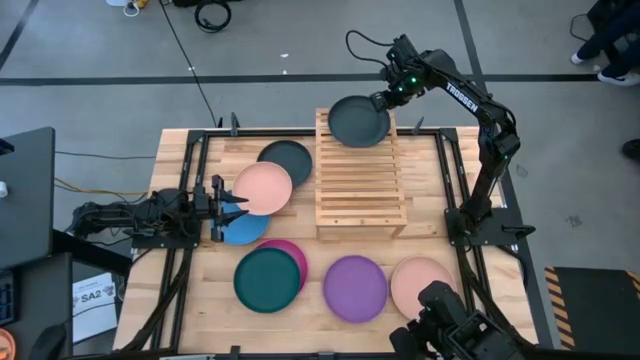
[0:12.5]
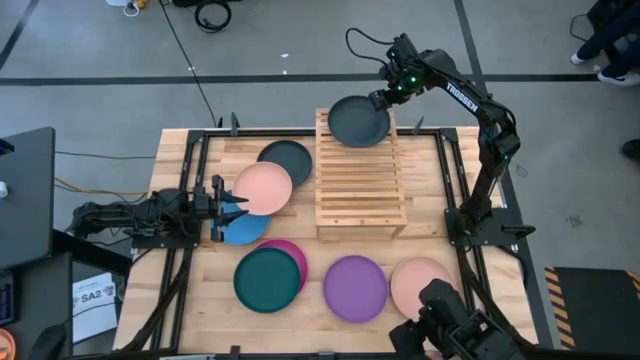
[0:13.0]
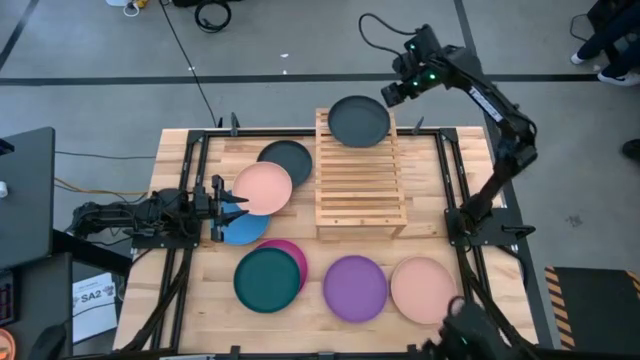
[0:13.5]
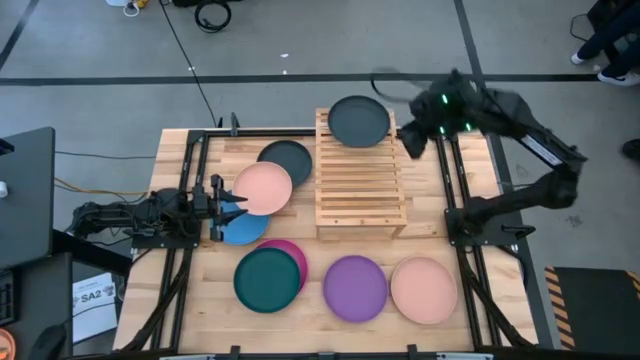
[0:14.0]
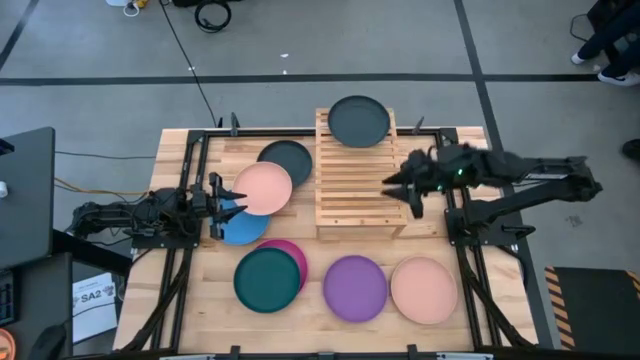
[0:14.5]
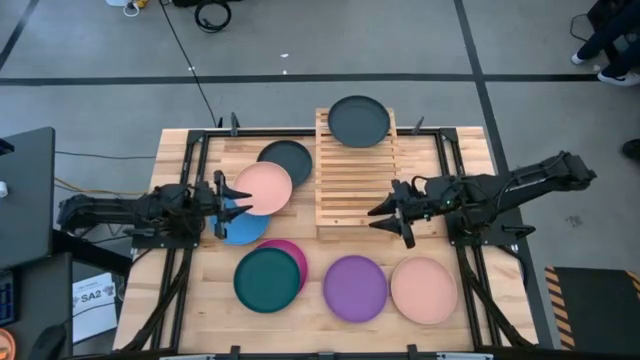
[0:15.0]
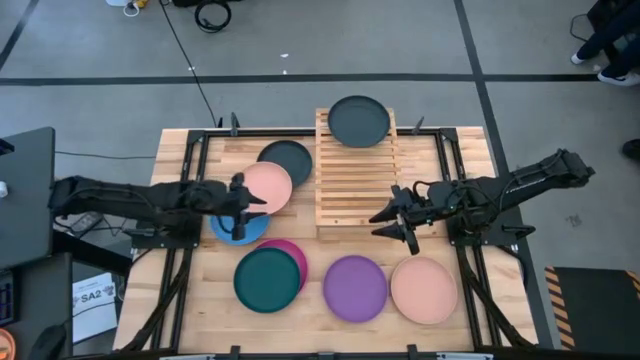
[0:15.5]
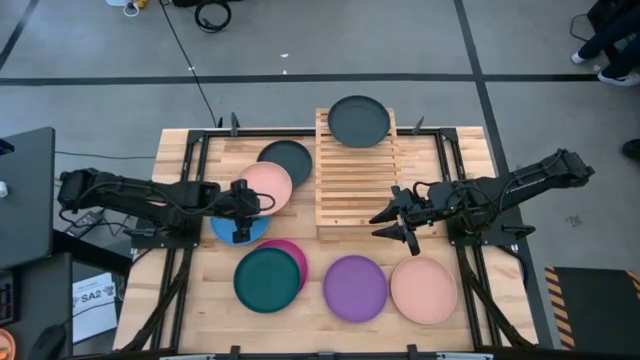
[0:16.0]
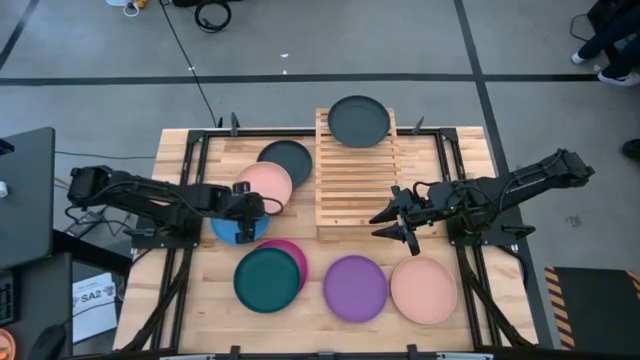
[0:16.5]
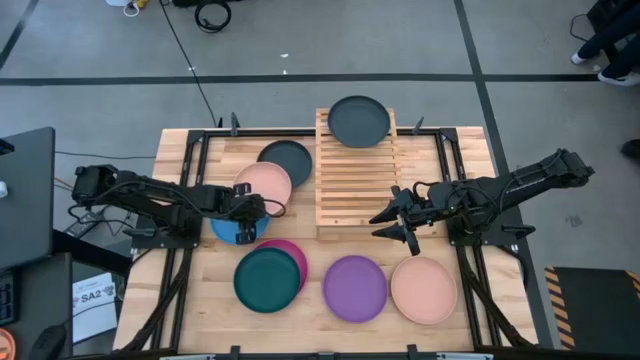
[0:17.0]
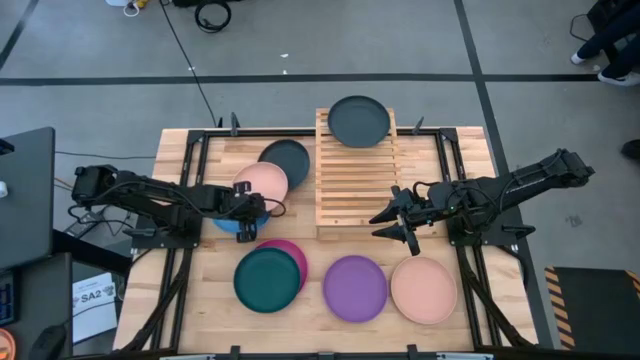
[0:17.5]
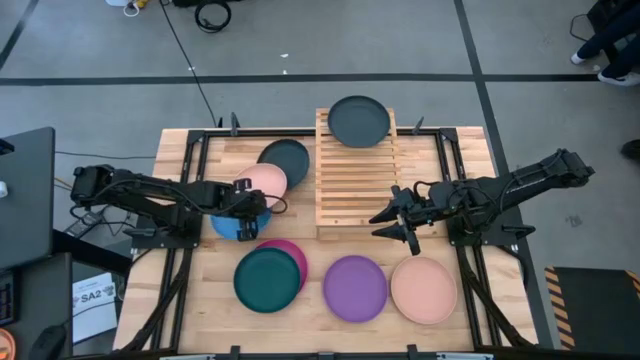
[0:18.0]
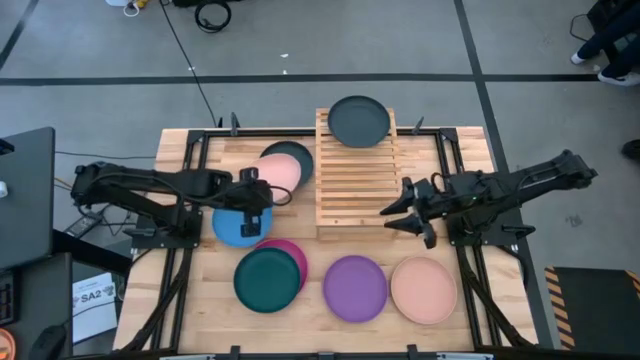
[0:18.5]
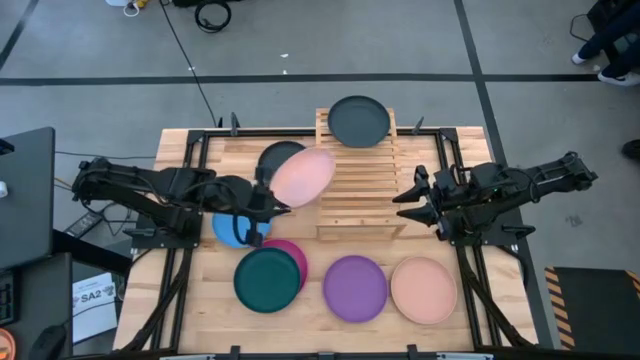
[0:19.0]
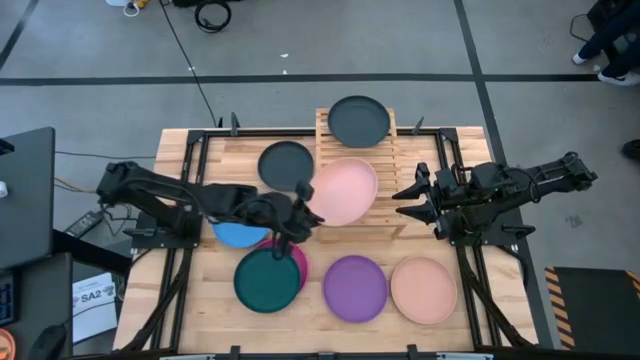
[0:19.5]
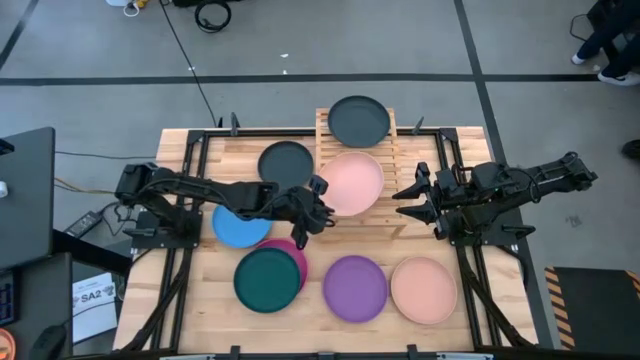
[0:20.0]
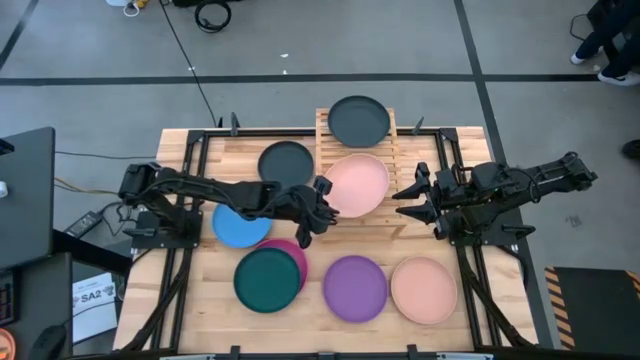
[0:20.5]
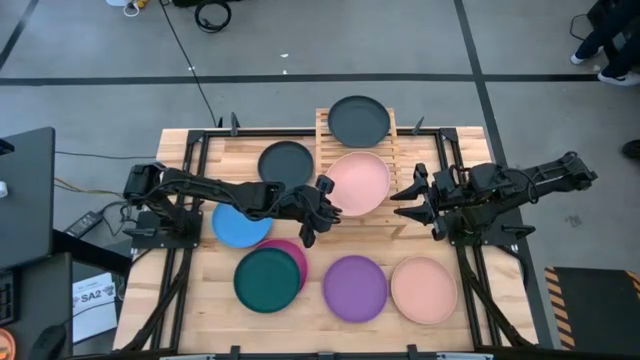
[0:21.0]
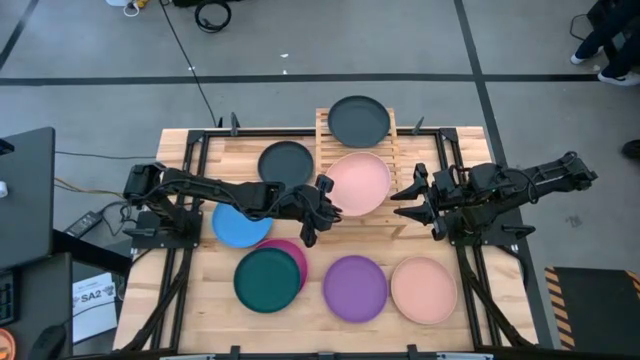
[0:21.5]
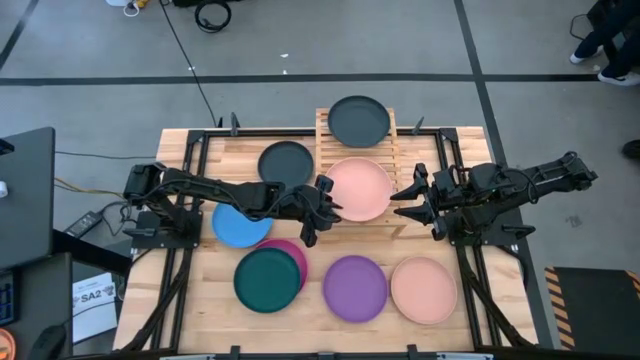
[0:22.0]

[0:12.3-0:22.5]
Task: Place and stack plates onto a shelf
Put the top light pink plate on the shelf

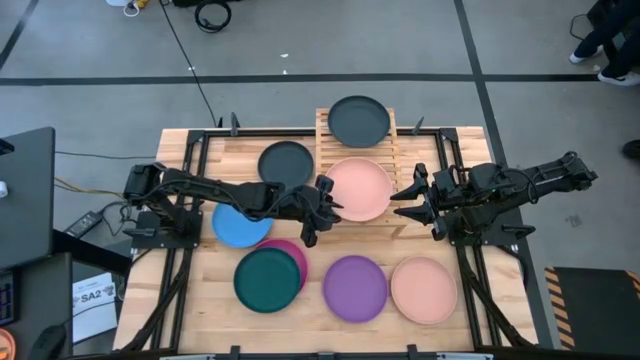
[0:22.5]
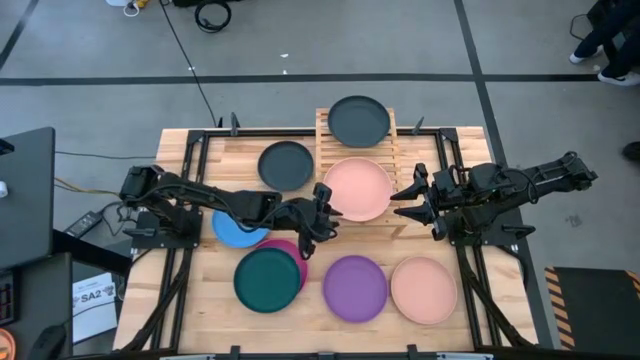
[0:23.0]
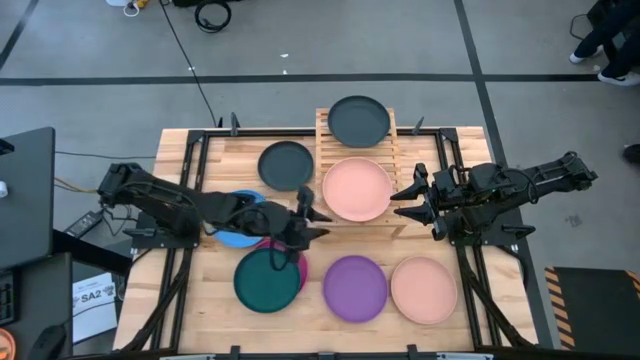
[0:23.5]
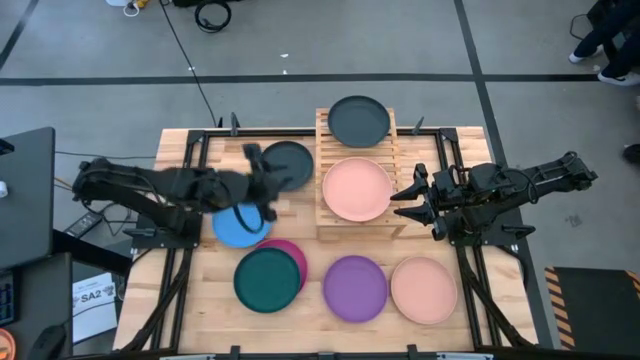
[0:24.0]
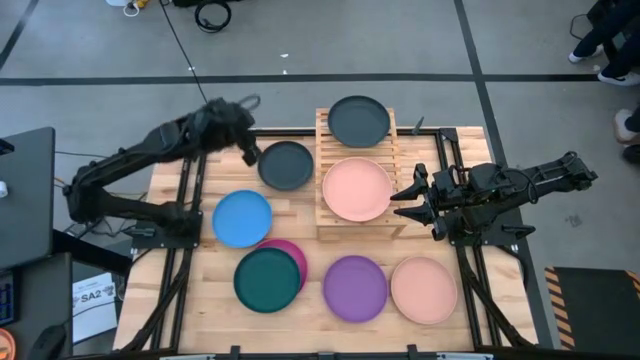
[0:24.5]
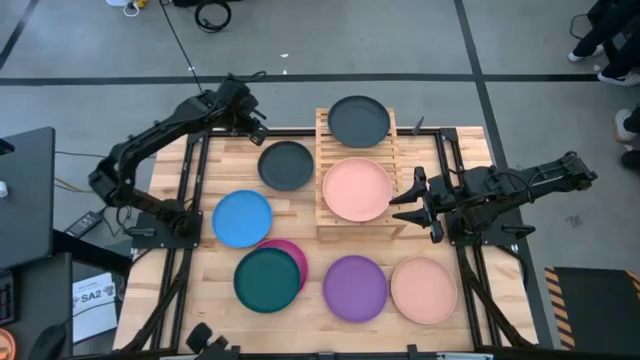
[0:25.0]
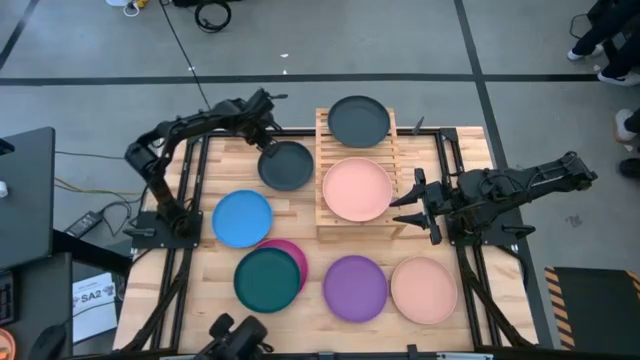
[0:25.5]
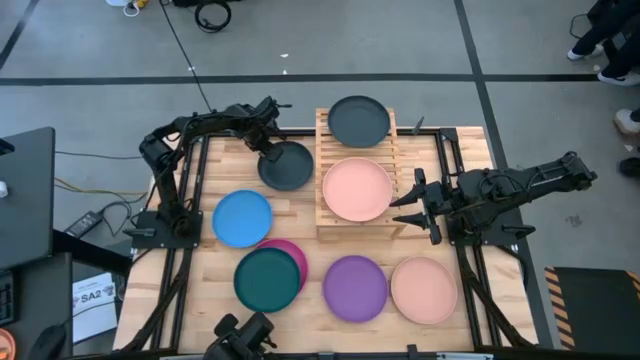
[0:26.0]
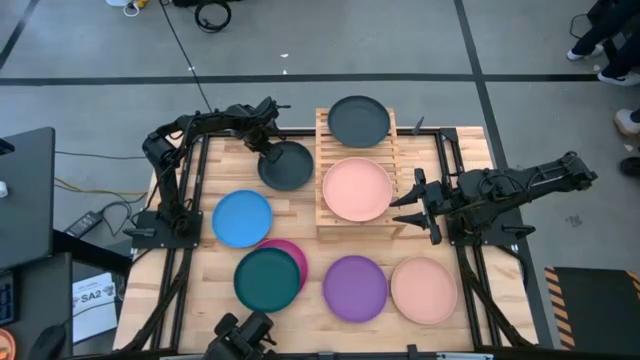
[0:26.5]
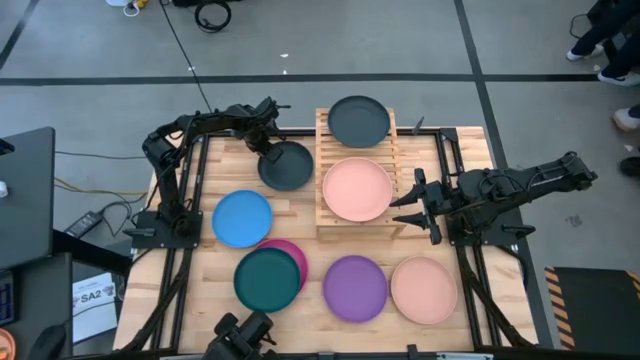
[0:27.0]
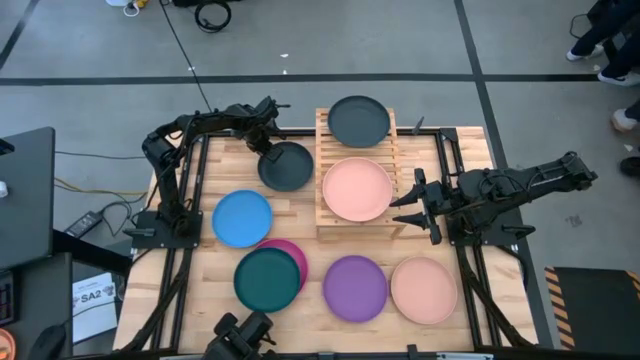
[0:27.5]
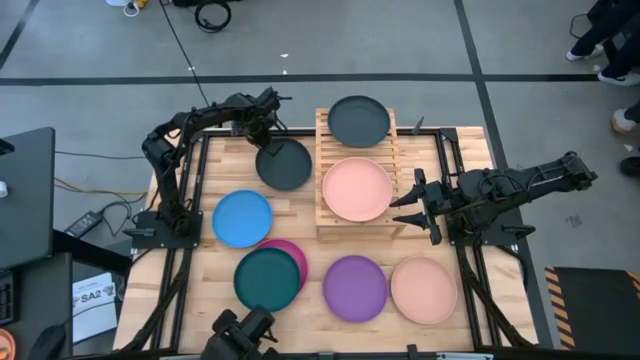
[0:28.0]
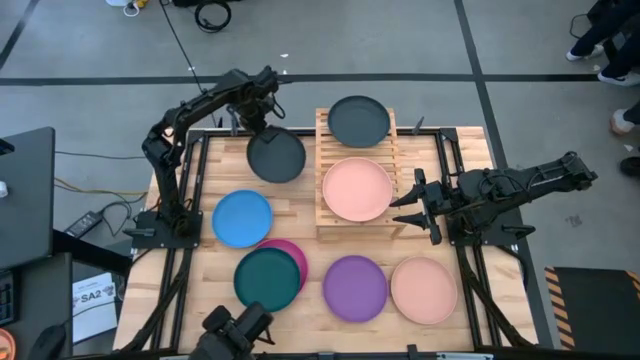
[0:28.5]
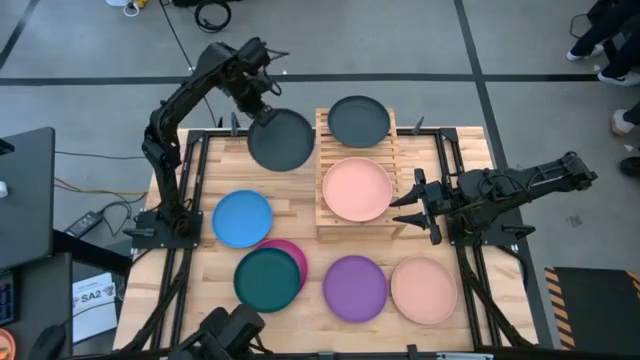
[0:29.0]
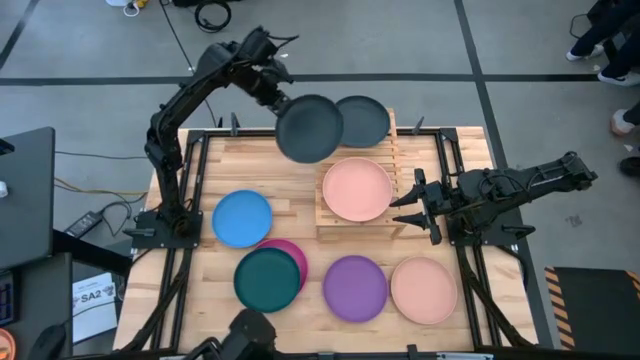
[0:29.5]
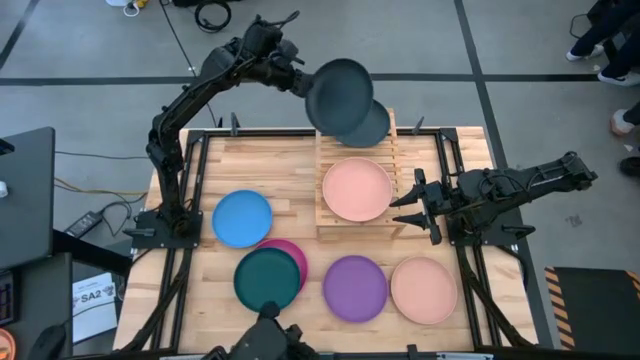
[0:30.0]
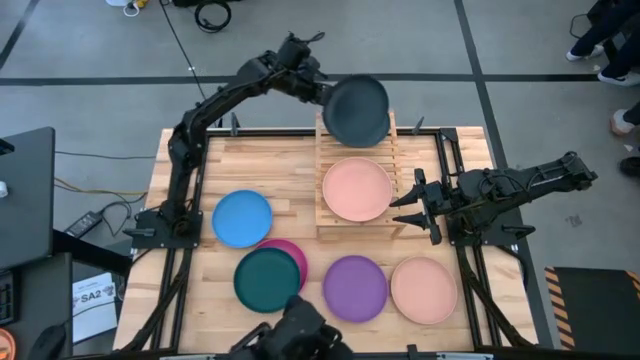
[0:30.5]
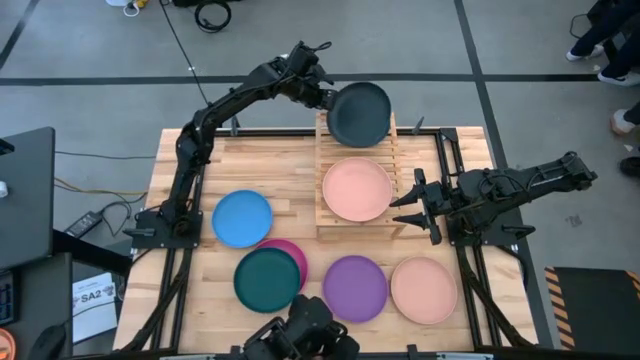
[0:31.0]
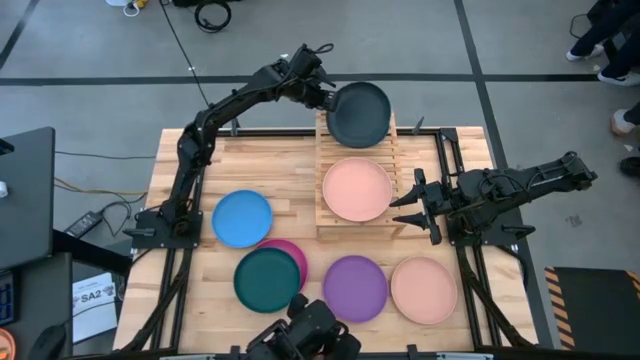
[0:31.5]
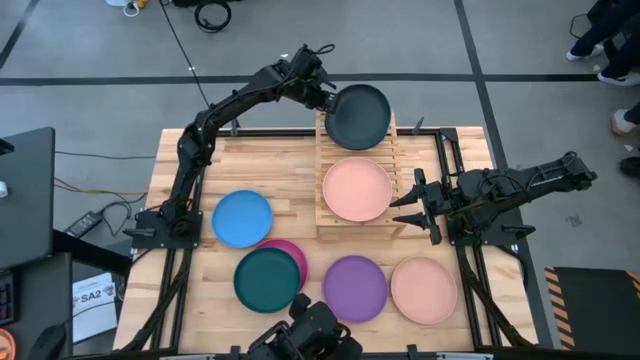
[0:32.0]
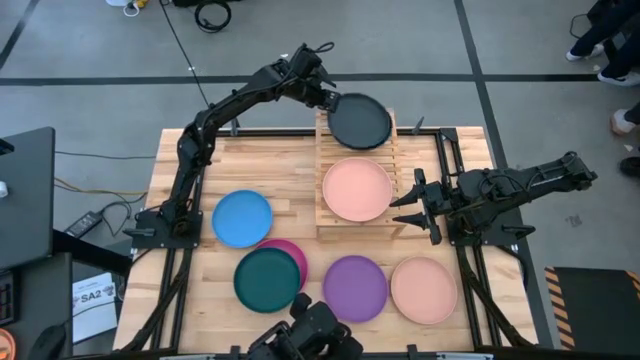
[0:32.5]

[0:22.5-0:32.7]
Stack the black plate on top of the black plate

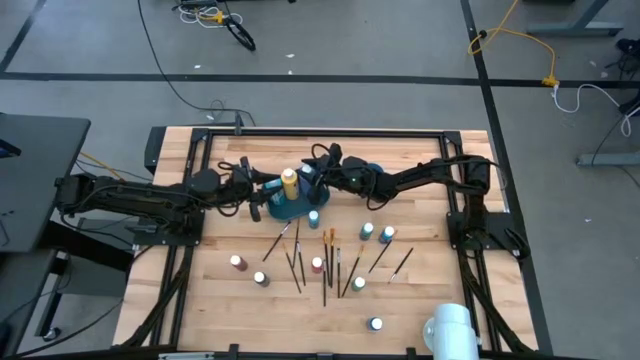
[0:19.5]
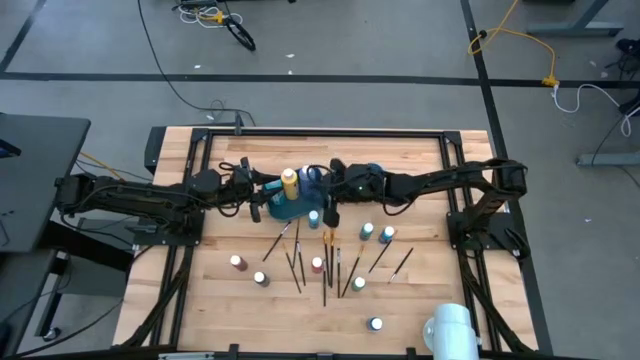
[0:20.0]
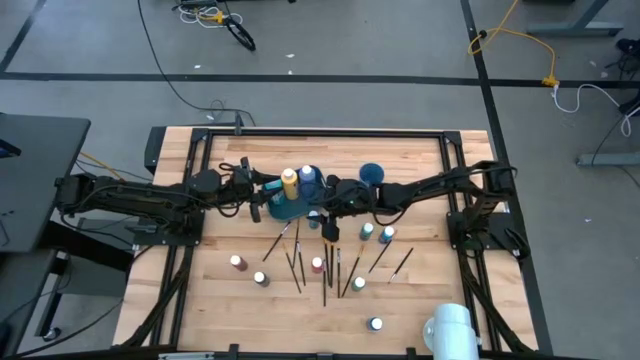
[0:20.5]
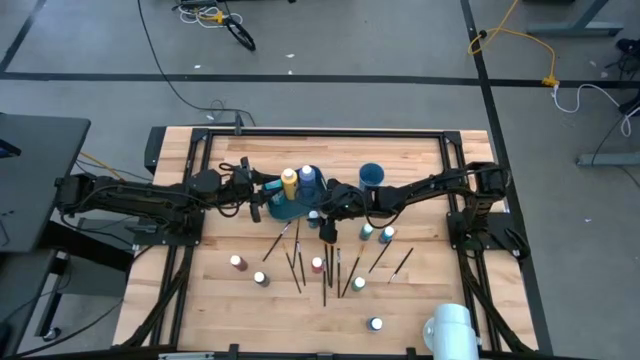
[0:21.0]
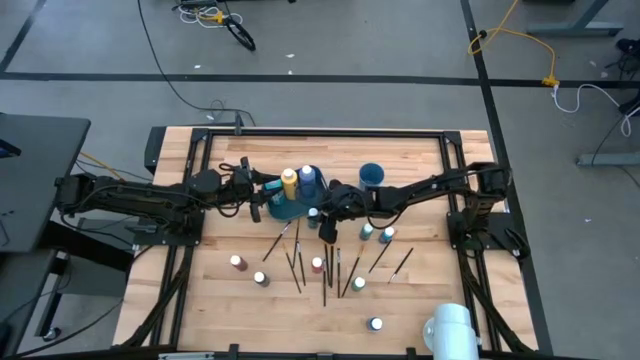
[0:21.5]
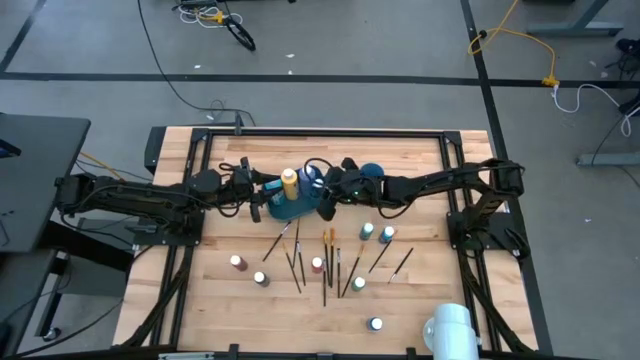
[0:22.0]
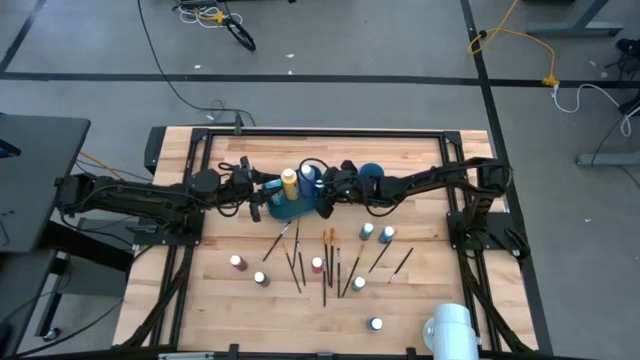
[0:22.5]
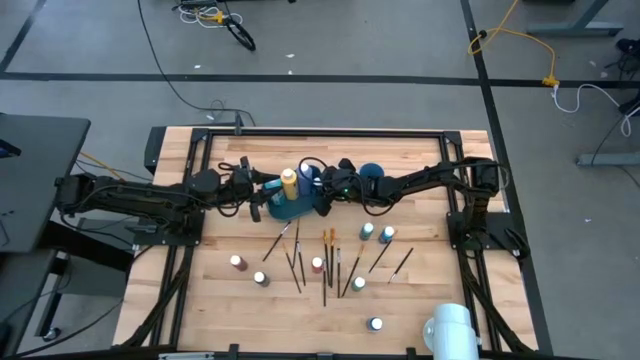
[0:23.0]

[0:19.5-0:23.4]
Task: Pick & Place Paint Supplies
Put the small light blue paint bottle into the blue bin
